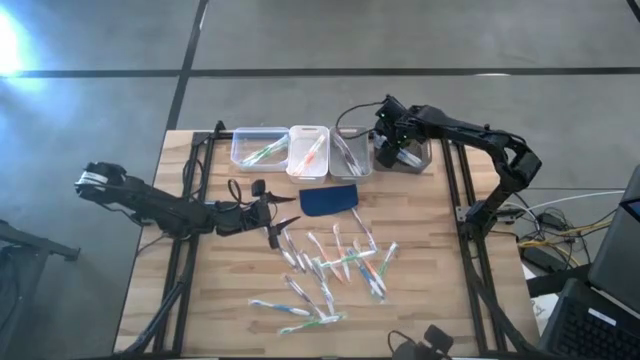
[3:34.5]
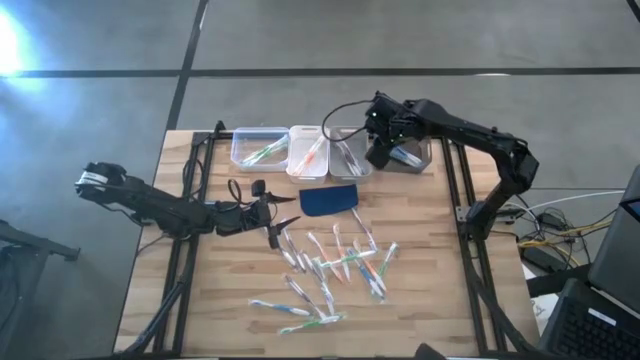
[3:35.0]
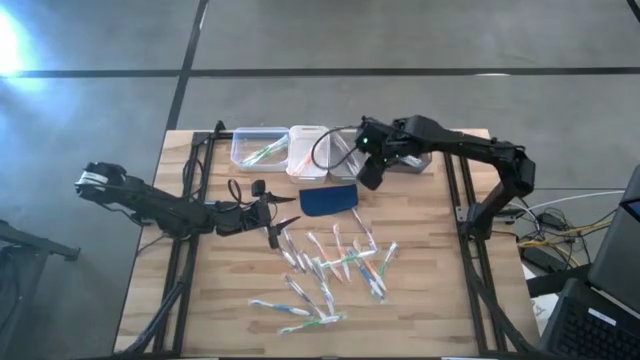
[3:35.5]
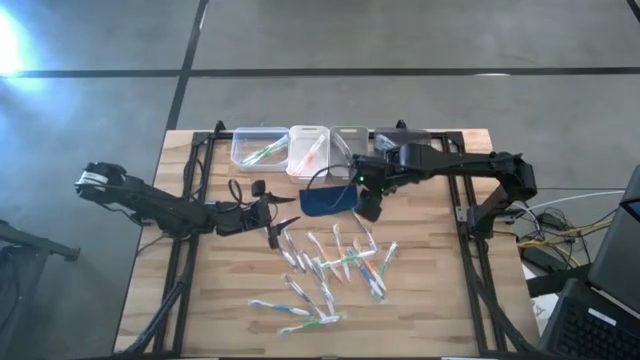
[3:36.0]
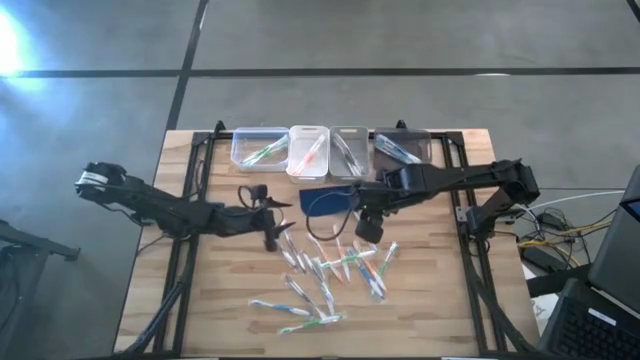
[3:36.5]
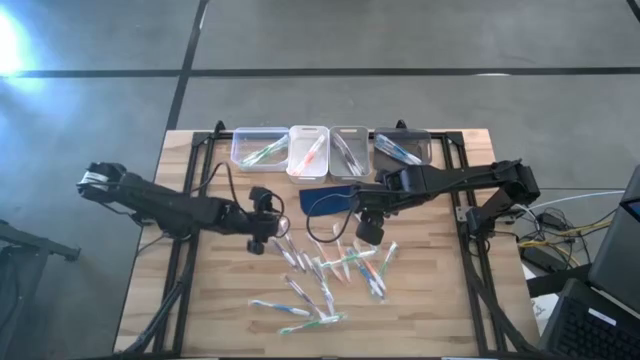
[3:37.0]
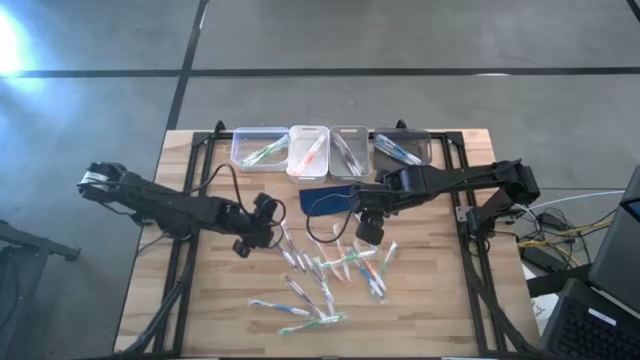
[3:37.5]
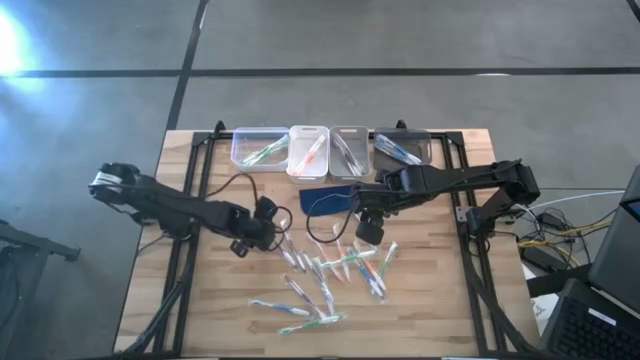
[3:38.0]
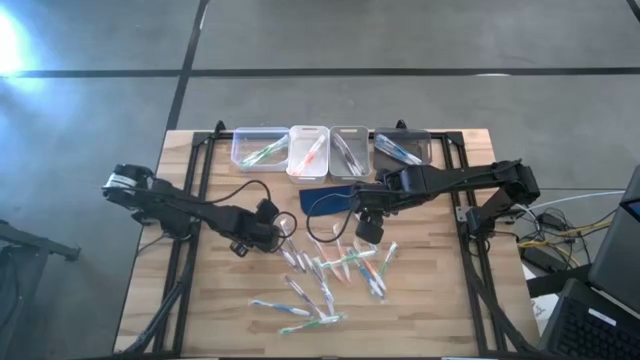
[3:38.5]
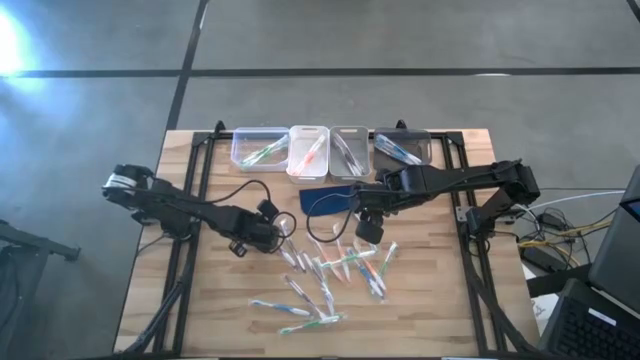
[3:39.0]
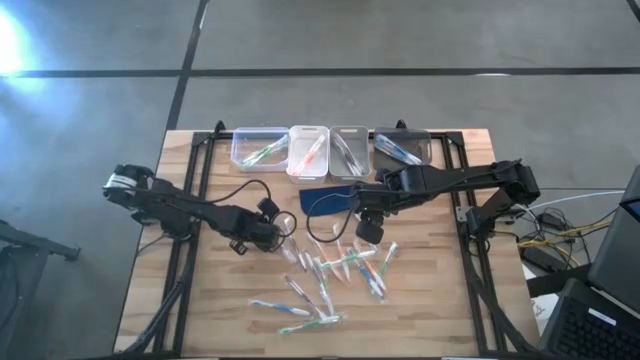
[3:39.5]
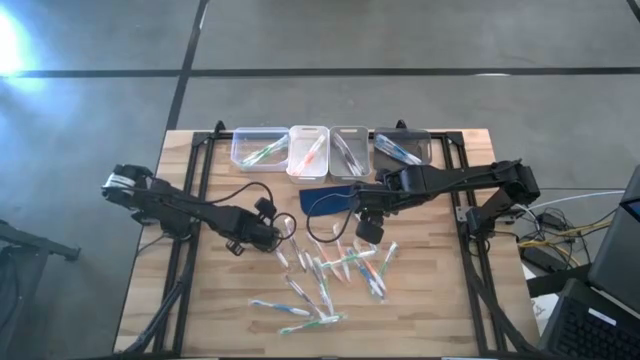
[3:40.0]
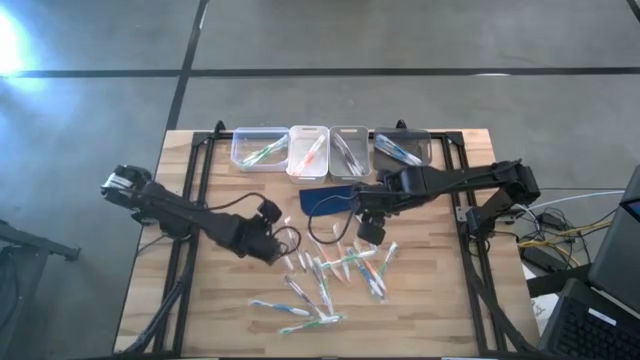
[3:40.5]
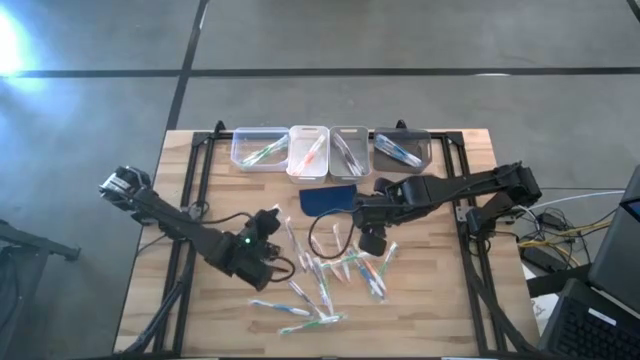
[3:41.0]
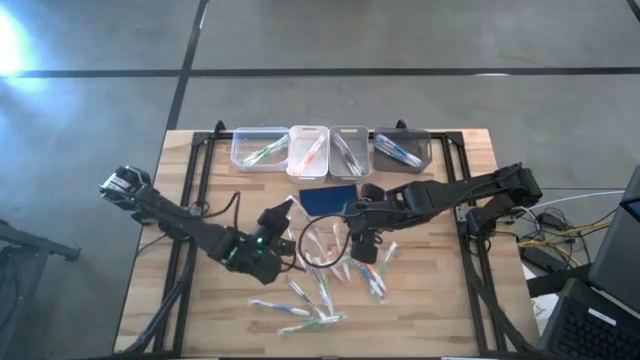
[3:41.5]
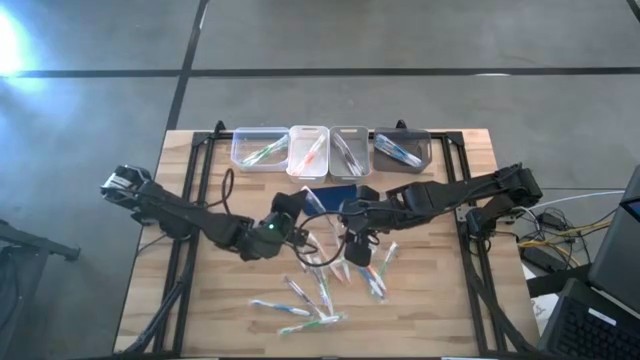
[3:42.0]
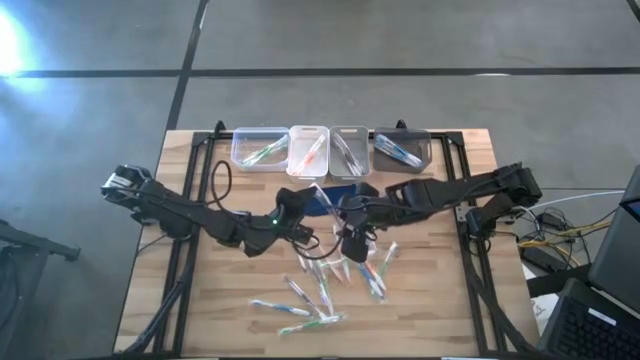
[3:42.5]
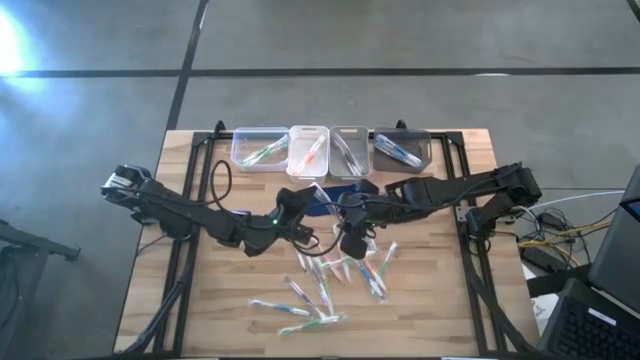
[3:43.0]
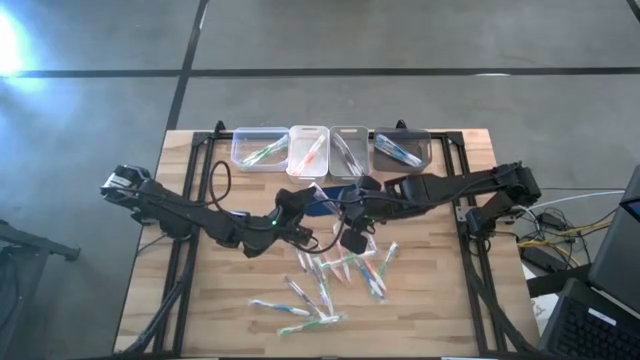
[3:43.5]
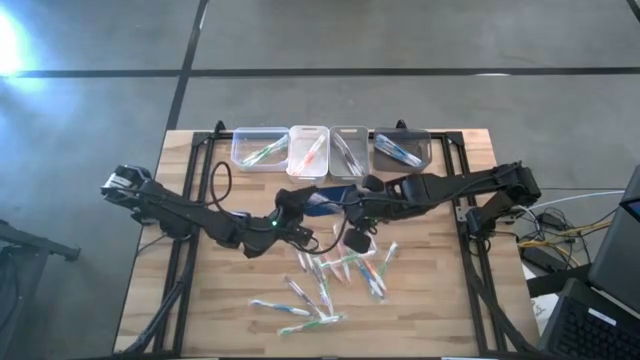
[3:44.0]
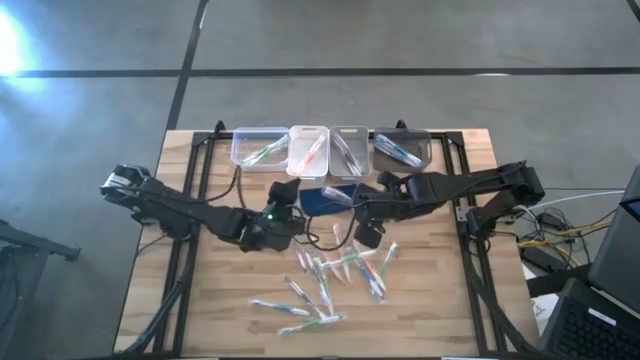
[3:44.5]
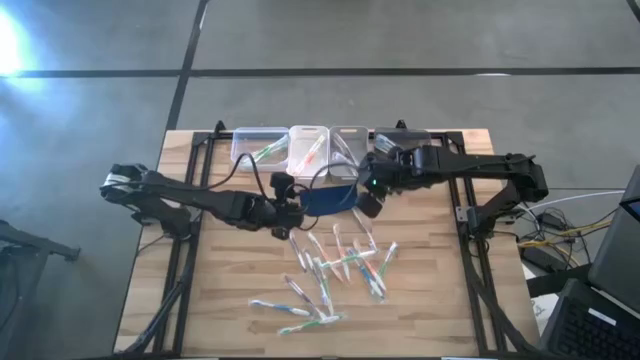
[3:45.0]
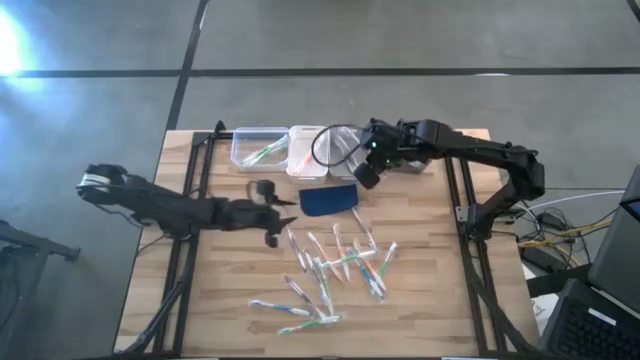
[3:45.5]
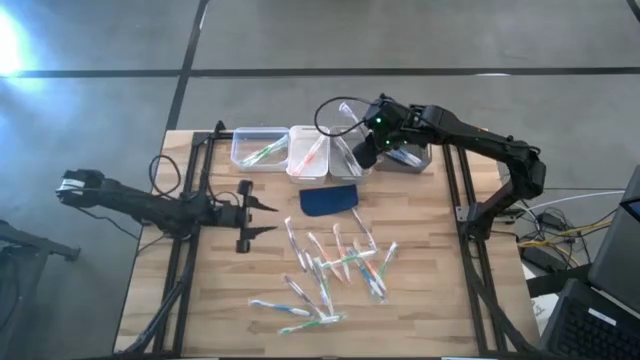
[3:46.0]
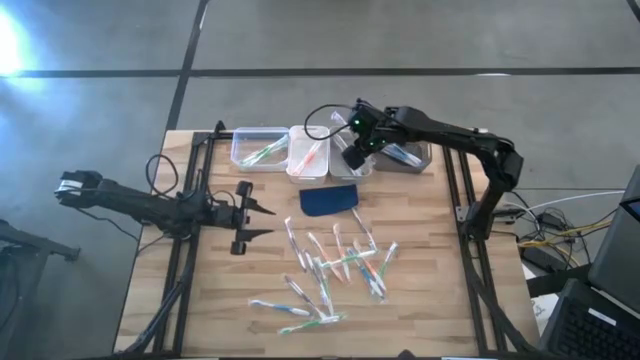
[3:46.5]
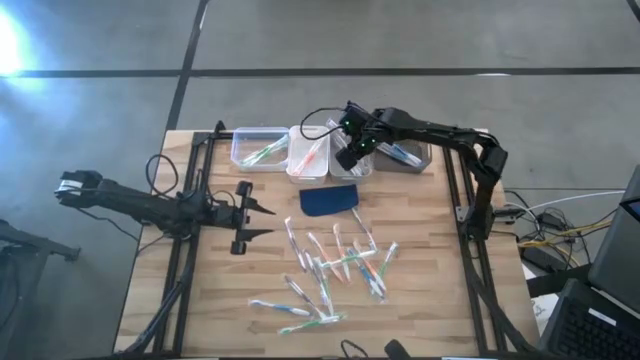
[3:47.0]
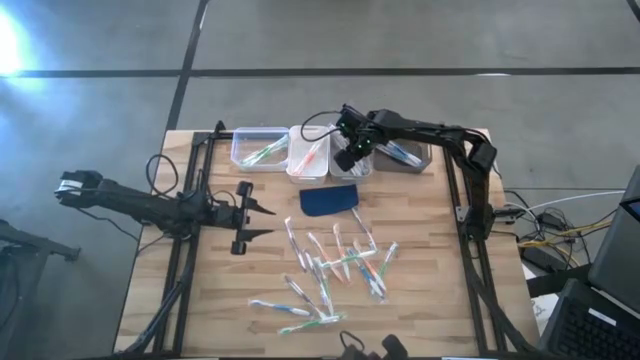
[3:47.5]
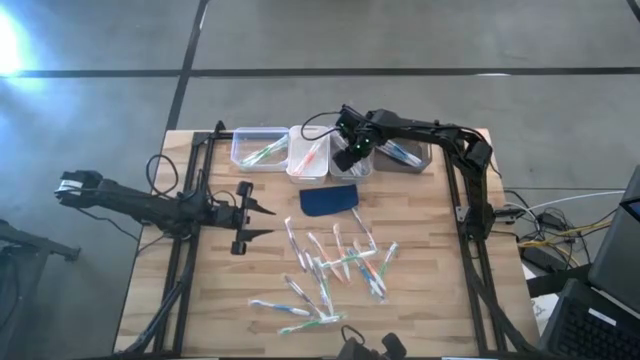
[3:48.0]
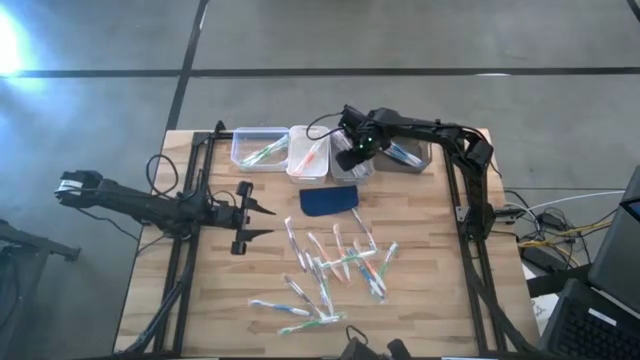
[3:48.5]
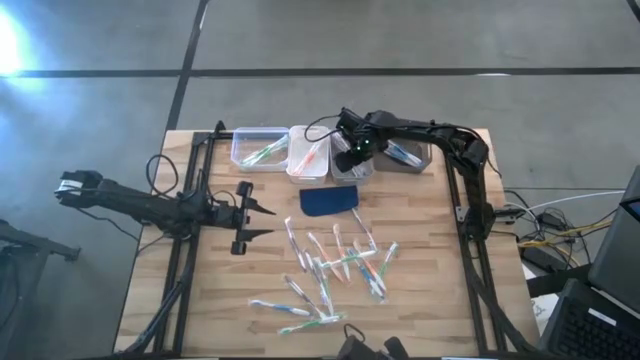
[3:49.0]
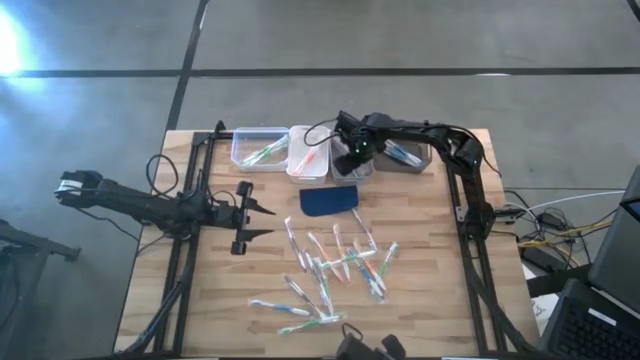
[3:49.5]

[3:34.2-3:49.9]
Task: Pick & Place Toothbrushes
Put the violet toothbrush into the gray bin

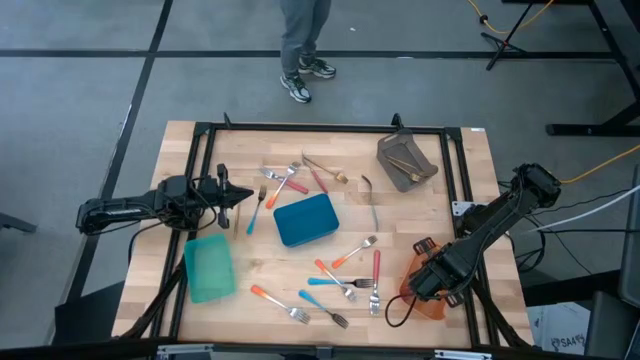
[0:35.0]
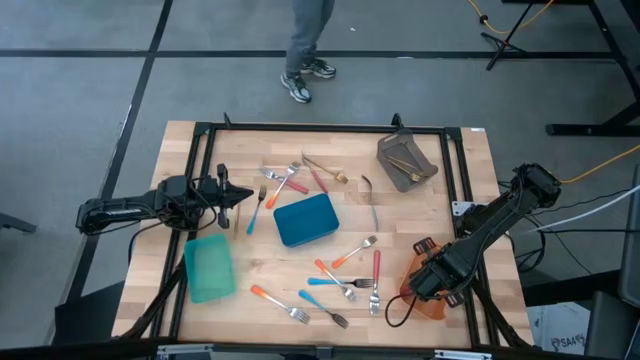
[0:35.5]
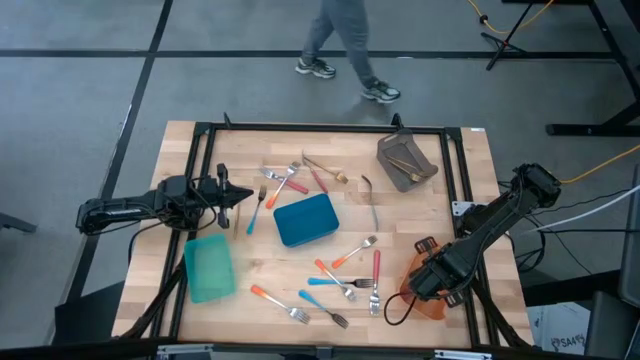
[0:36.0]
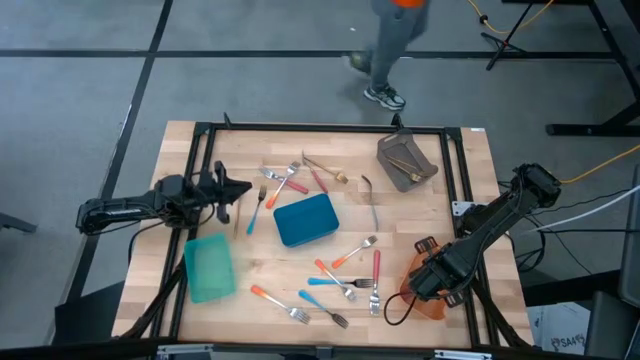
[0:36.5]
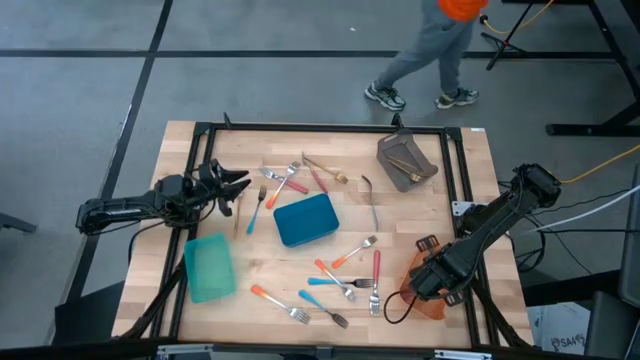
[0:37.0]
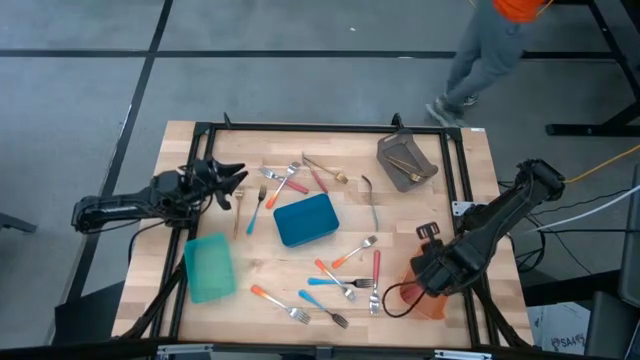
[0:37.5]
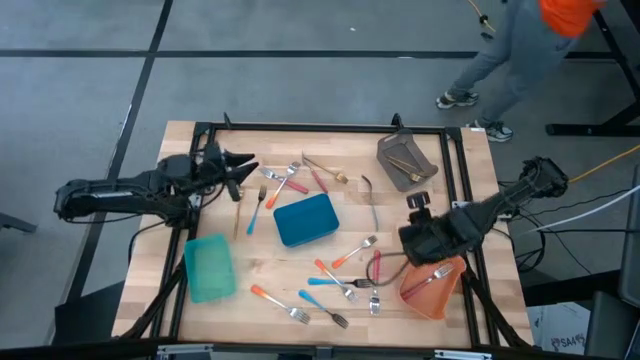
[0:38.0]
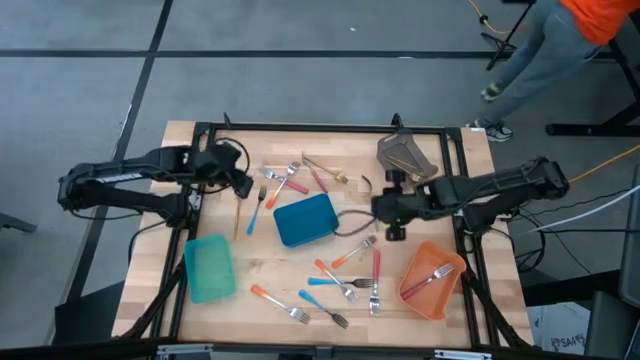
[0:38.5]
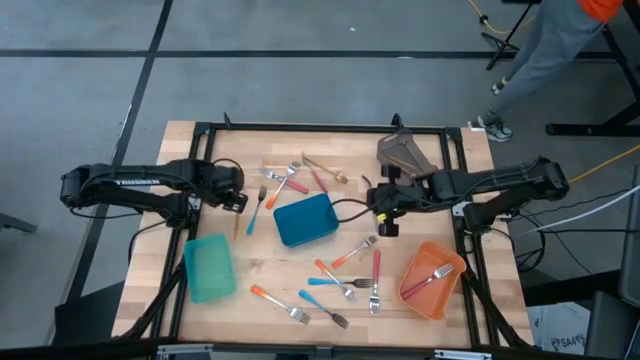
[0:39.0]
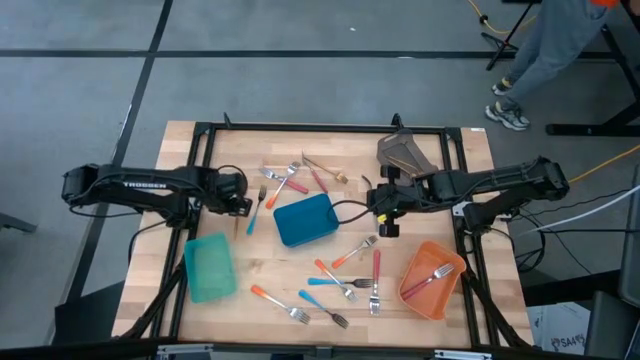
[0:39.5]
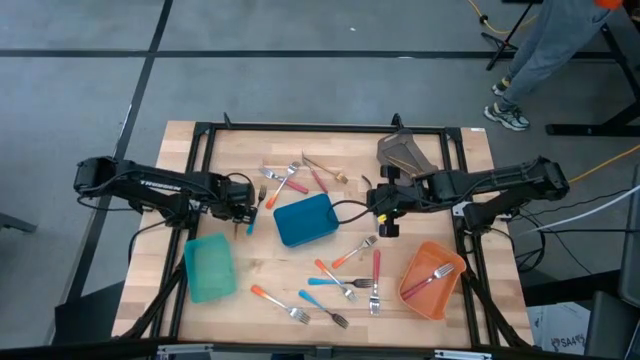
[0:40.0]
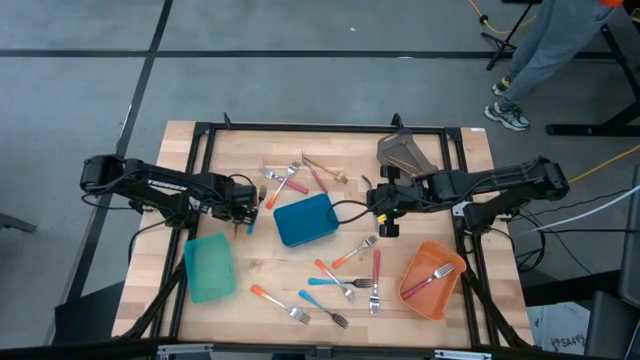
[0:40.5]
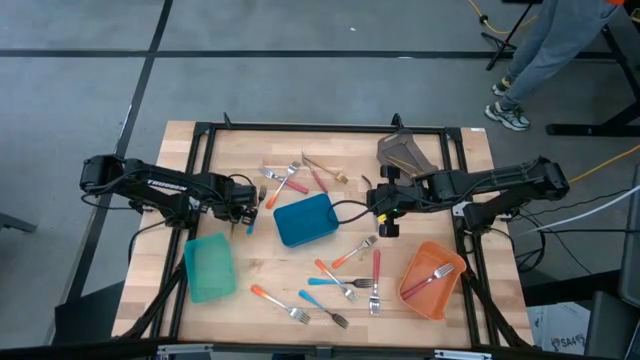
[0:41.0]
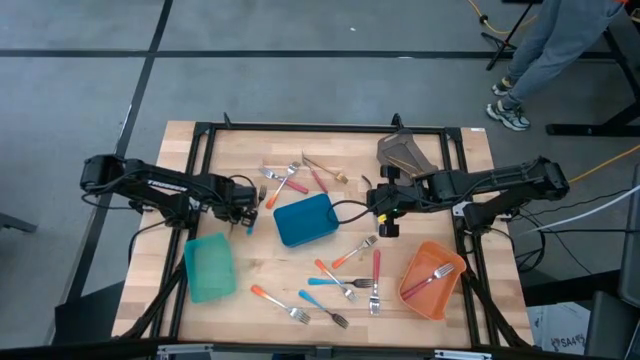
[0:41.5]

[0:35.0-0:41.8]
Task: Sort silverware by color (type)
Put the left golden fork into the black bin
